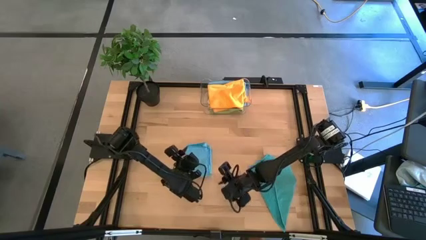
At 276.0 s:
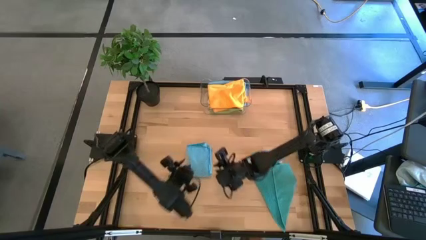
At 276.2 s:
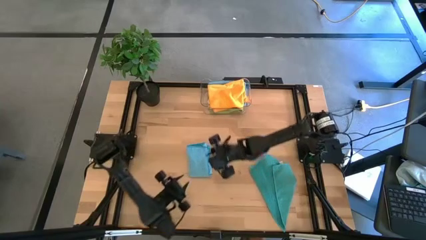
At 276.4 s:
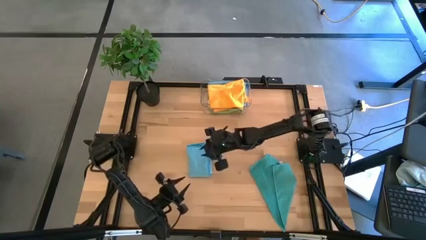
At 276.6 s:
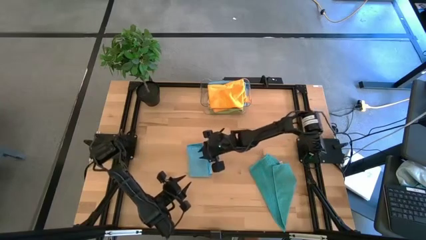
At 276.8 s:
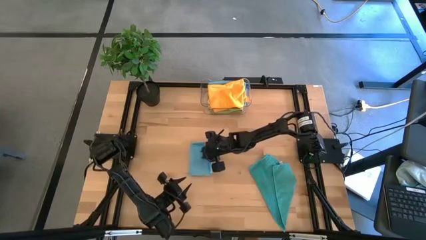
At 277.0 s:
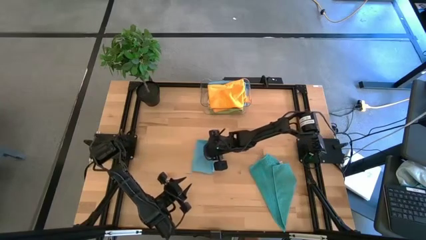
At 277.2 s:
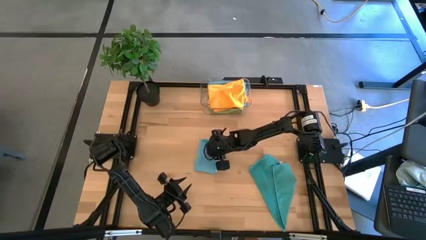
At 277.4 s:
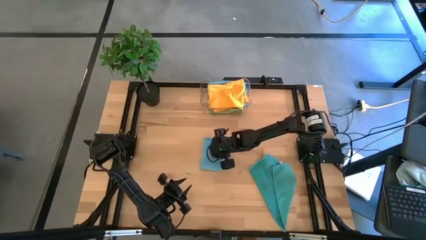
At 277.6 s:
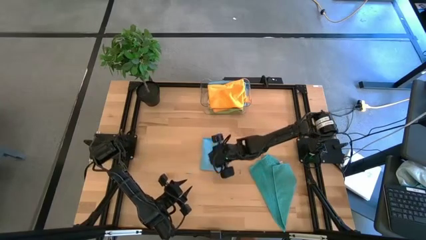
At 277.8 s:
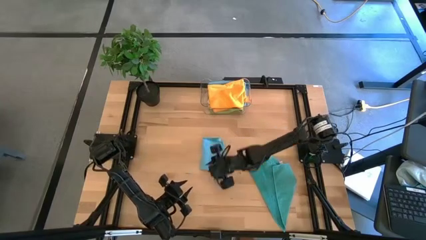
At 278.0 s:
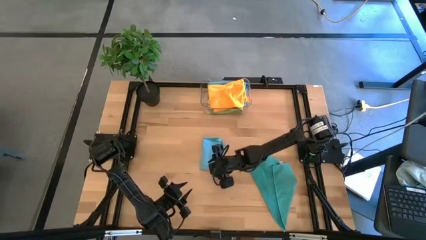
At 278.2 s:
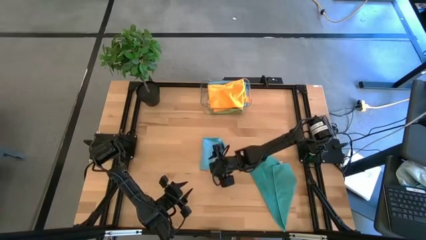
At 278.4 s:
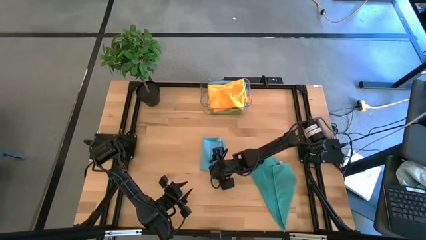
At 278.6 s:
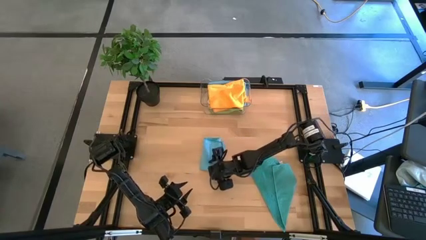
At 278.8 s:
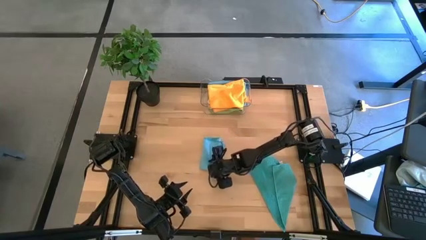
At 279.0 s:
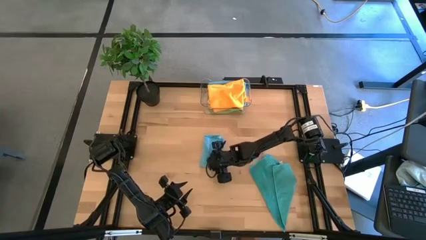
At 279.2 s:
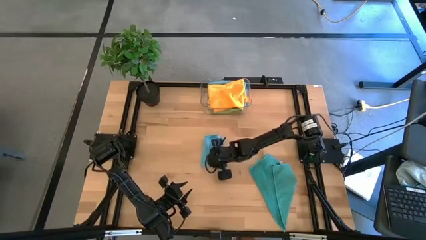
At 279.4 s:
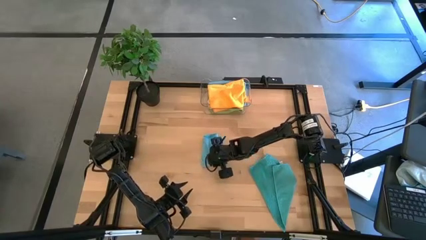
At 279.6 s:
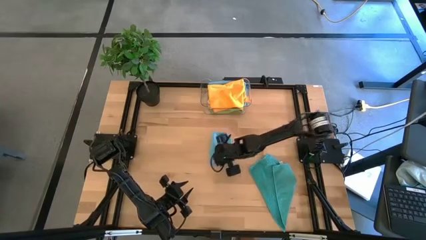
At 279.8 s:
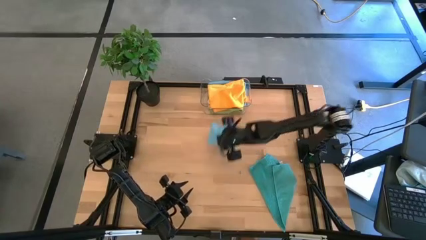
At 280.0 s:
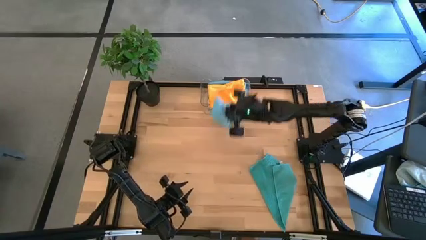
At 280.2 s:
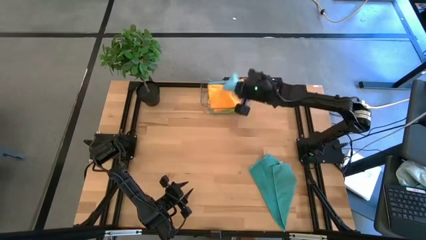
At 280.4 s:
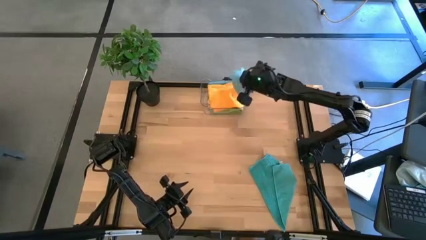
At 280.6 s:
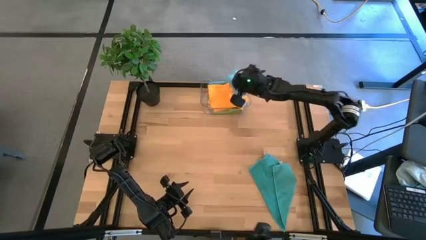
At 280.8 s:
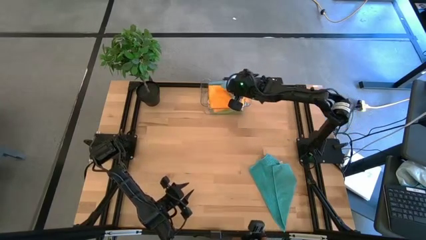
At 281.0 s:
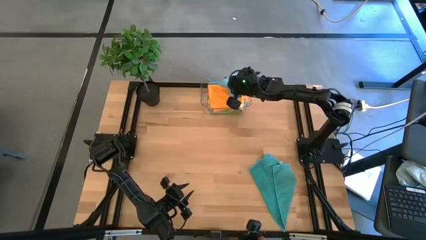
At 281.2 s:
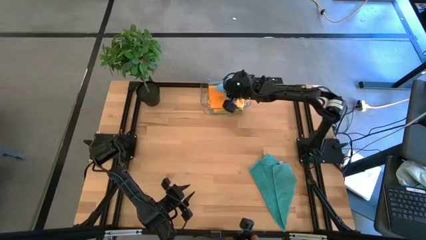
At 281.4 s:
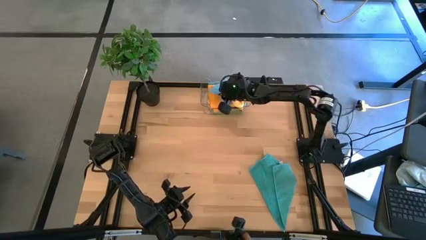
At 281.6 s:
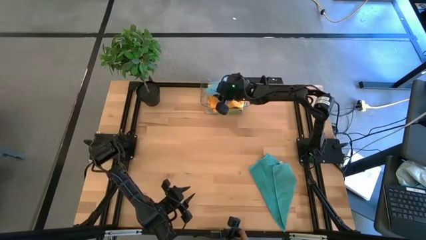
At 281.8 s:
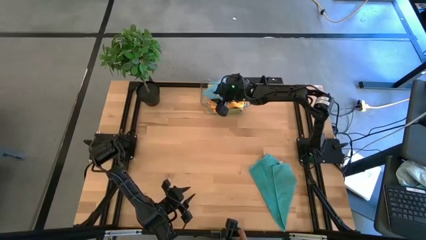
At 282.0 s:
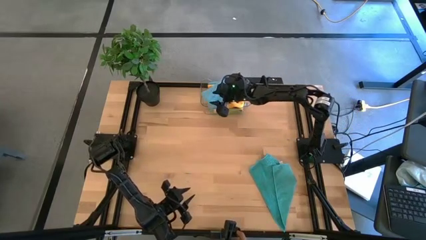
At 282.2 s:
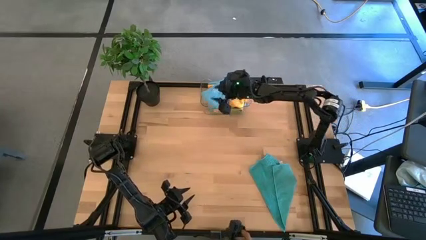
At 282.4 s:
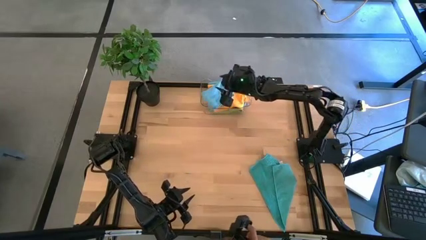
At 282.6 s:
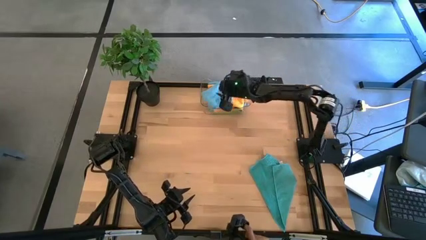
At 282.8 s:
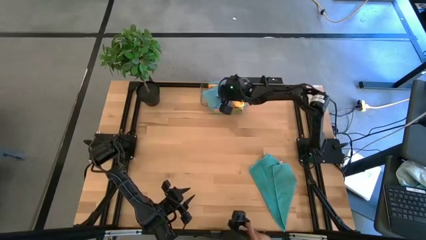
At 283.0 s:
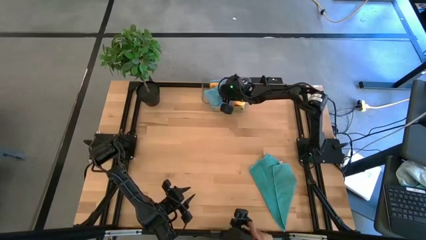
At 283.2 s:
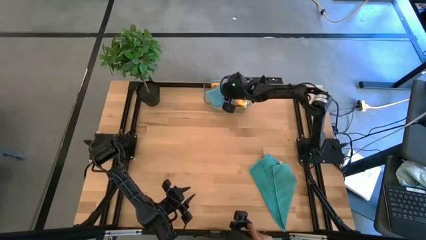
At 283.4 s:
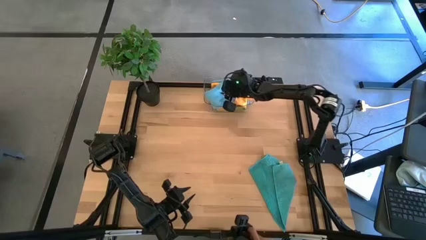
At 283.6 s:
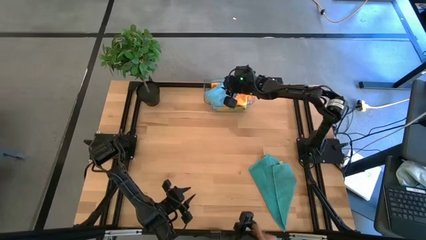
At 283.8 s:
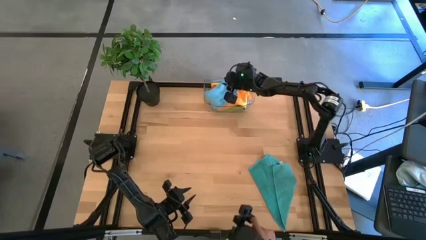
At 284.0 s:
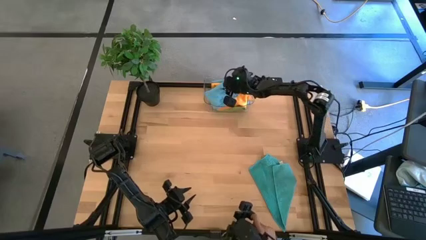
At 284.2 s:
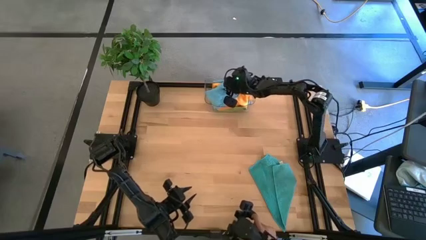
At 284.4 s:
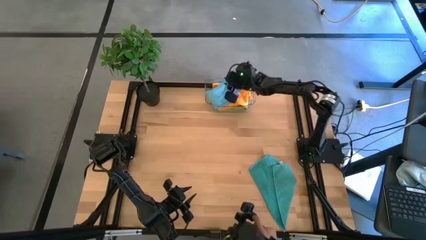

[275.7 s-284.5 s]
Task: Fold microfiber towels
Put the folded blue microfiber towel into the transparent bin

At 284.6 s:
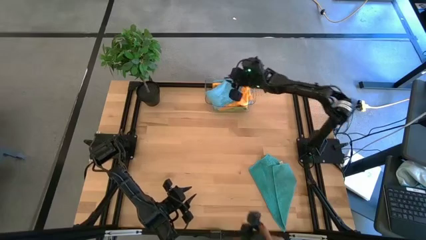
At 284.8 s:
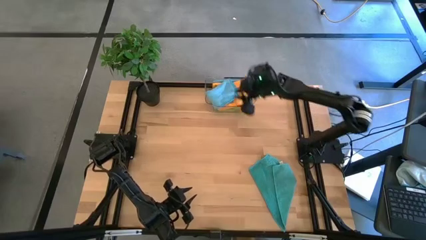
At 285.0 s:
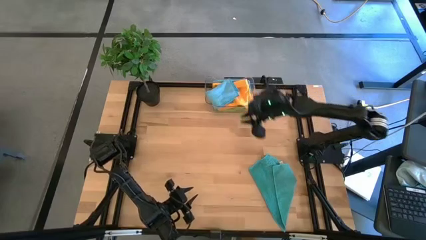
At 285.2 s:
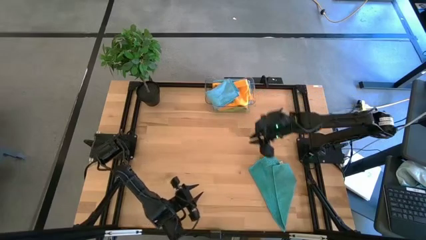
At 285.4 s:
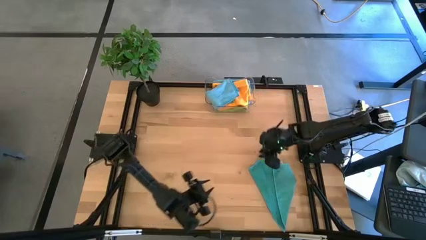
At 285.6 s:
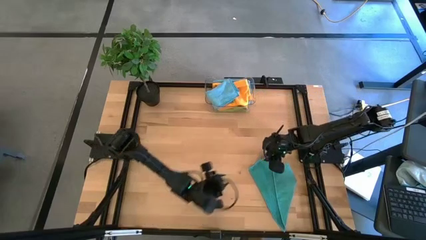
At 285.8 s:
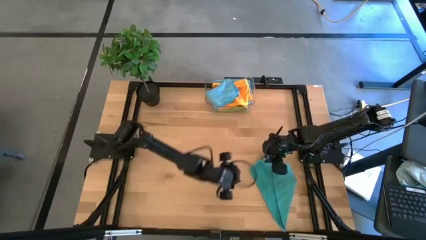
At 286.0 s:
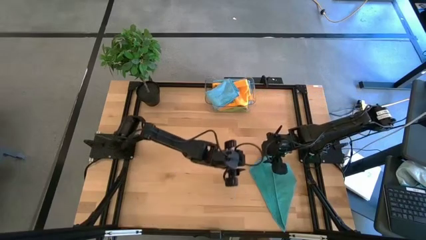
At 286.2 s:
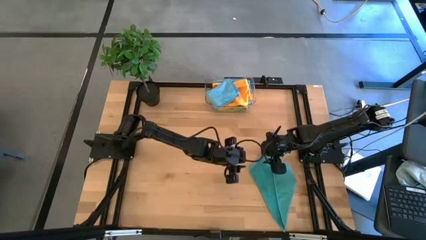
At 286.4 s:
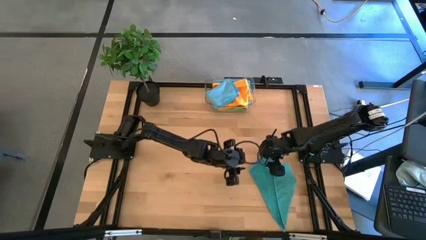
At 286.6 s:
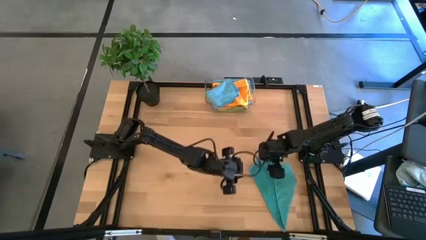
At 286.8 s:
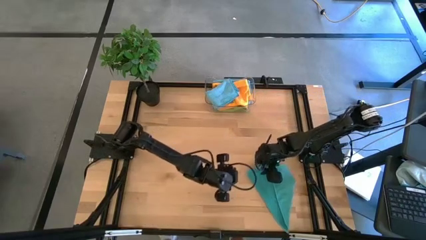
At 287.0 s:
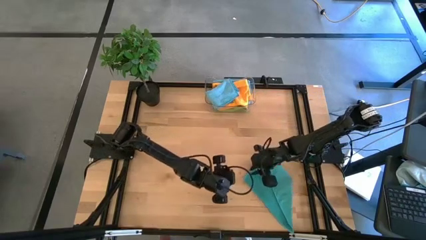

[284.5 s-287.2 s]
Fold the blue microfiber towel
